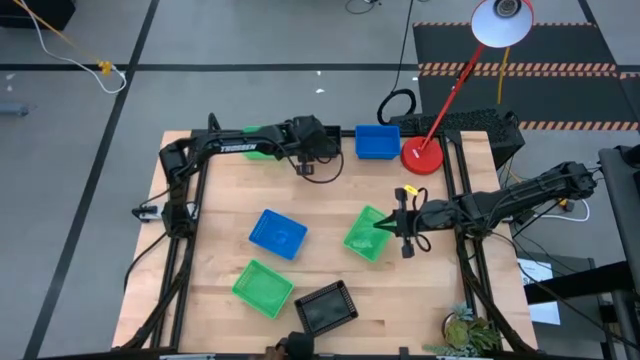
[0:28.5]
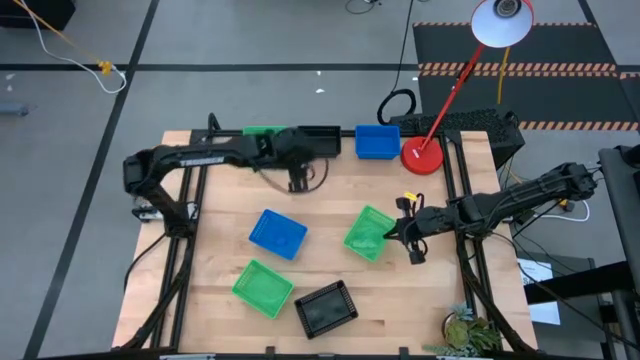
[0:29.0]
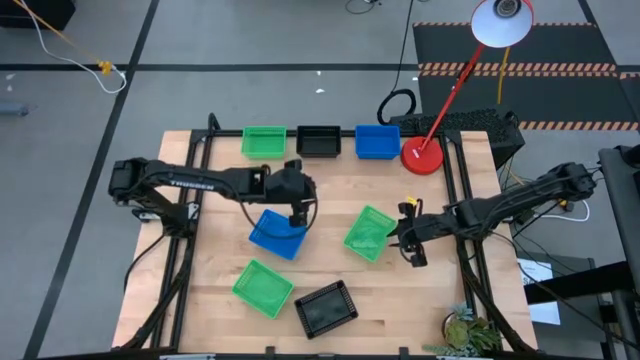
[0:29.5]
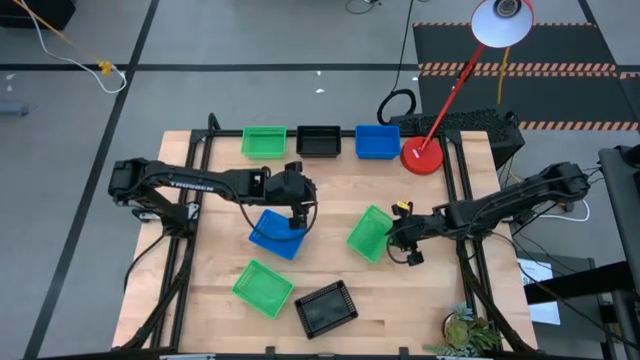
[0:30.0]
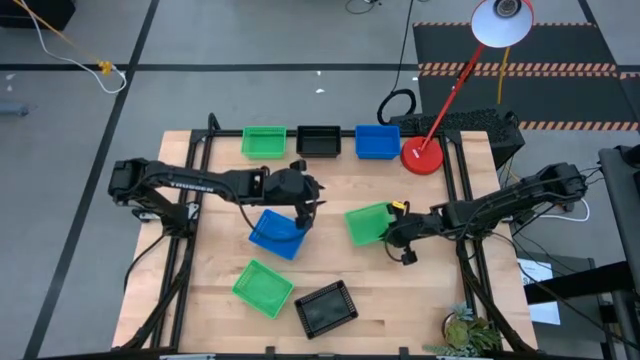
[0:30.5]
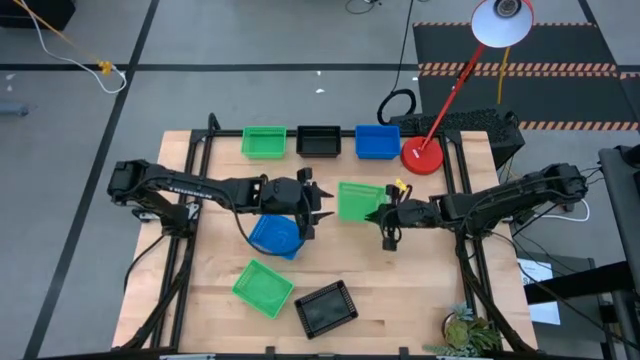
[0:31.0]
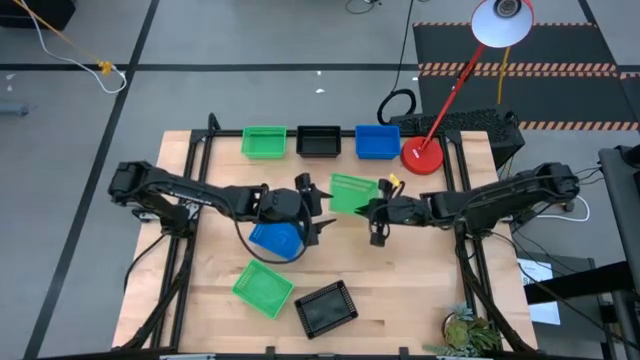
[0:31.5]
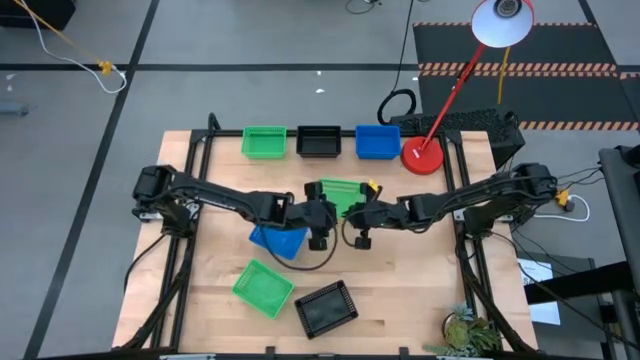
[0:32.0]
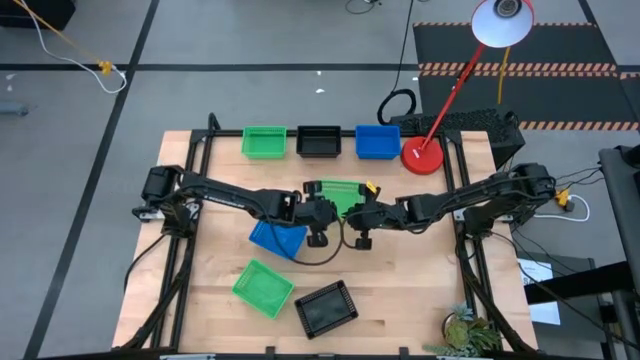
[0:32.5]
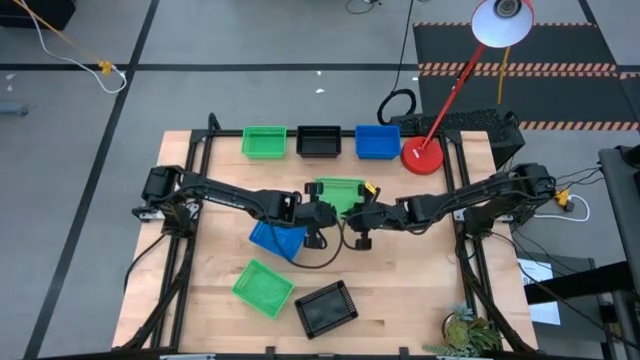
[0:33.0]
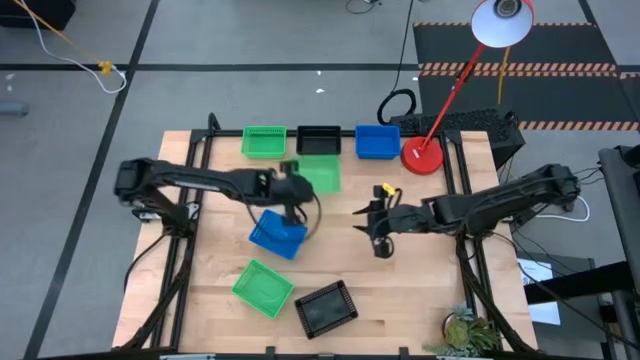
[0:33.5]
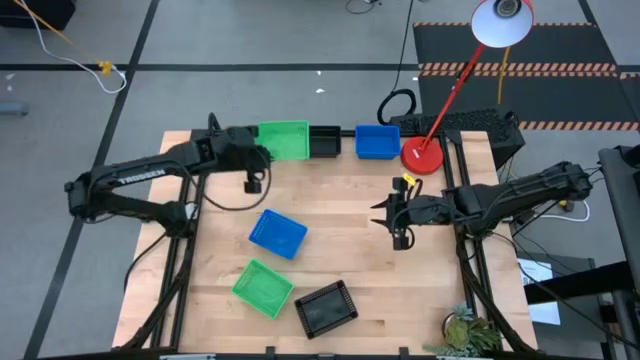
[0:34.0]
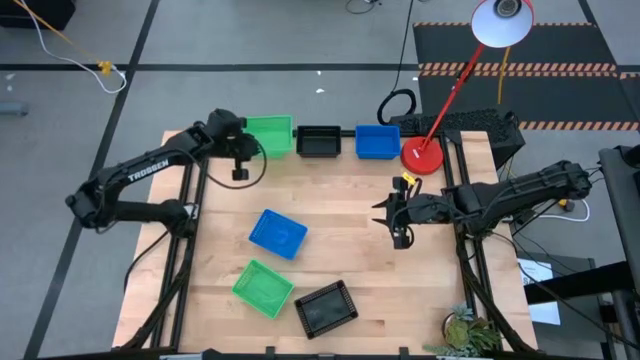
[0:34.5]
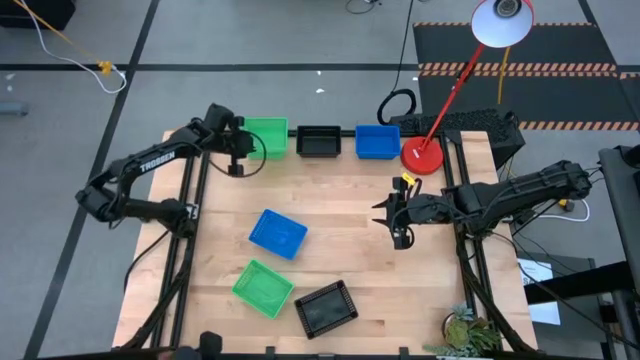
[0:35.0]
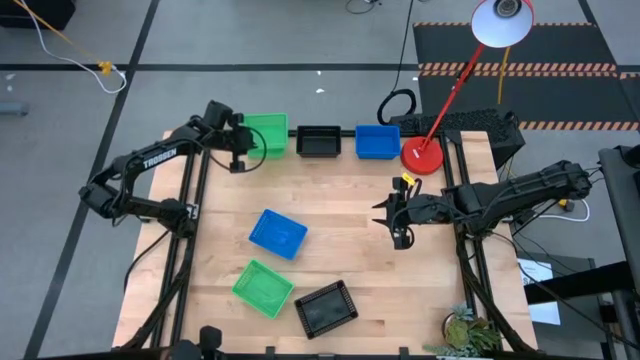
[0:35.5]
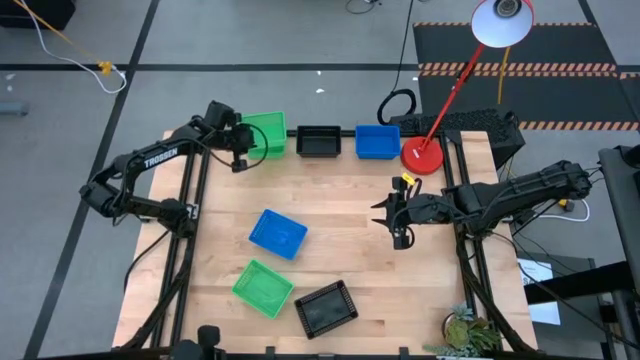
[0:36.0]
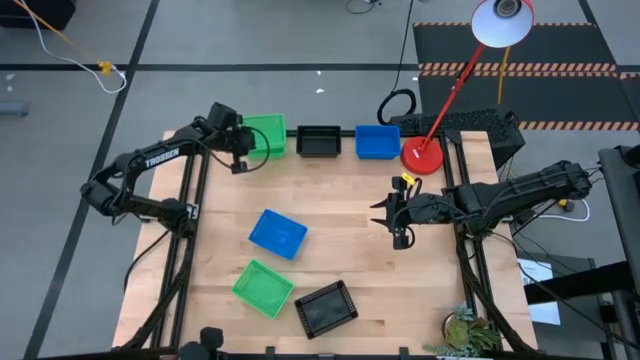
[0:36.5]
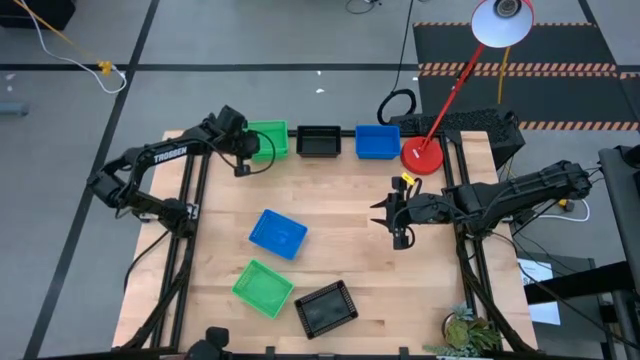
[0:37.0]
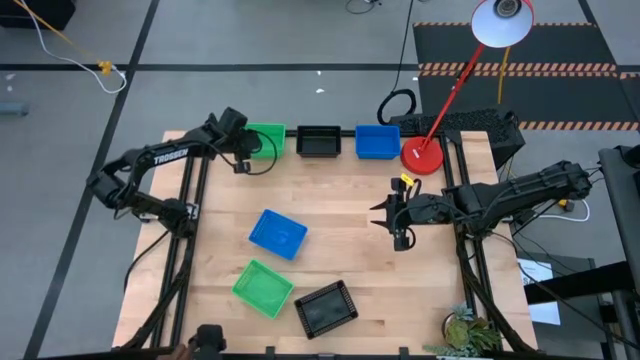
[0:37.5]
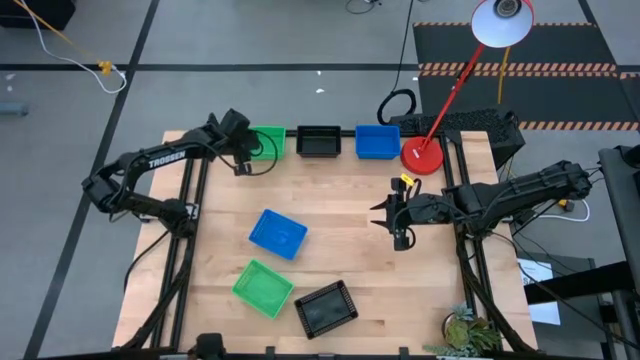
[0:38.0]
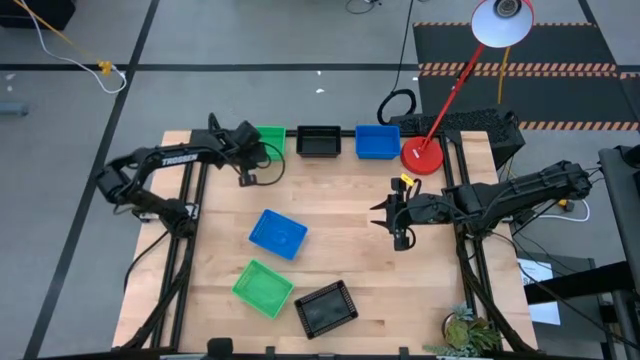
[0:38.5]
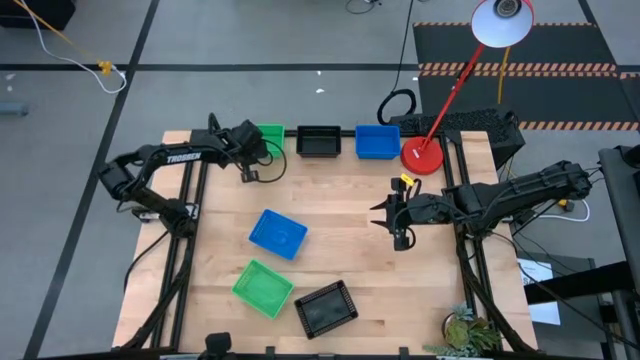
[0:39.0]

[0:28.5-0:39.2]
Stack the middle green bin on the top green bin

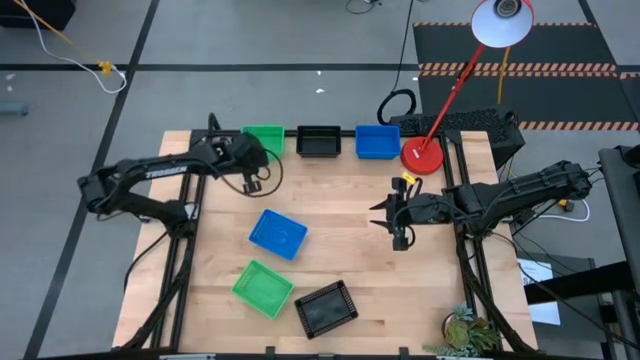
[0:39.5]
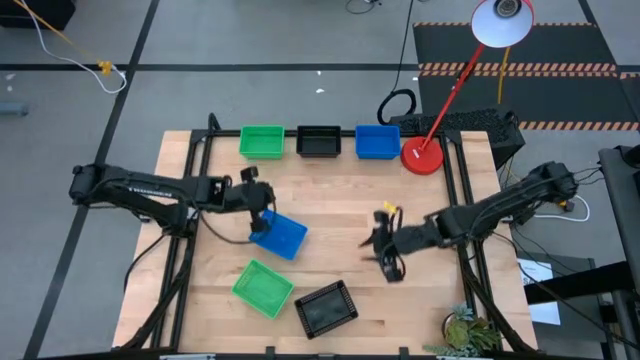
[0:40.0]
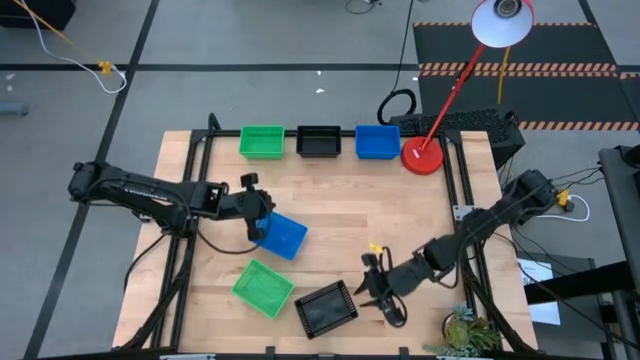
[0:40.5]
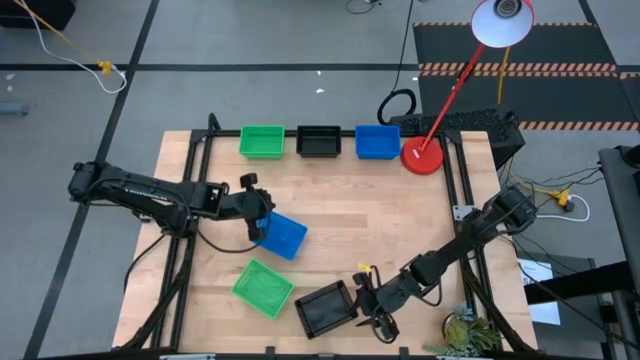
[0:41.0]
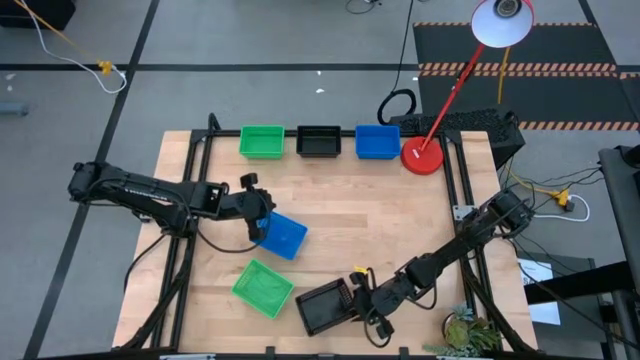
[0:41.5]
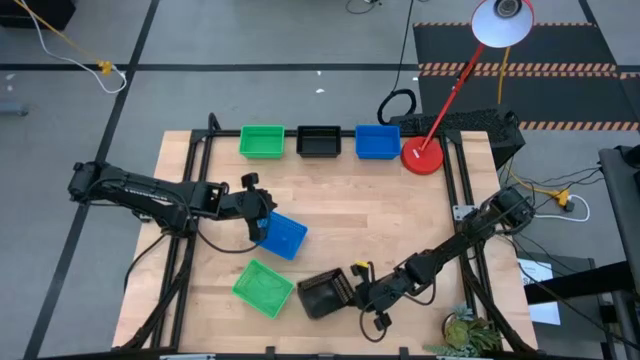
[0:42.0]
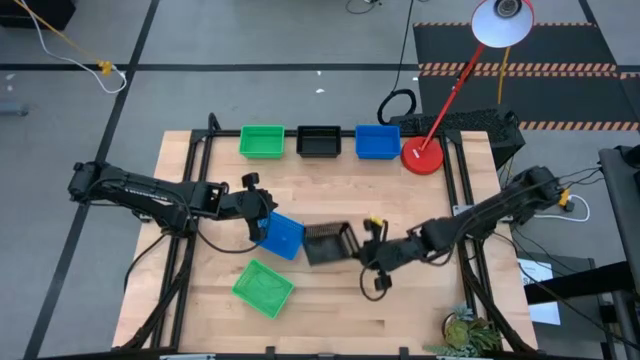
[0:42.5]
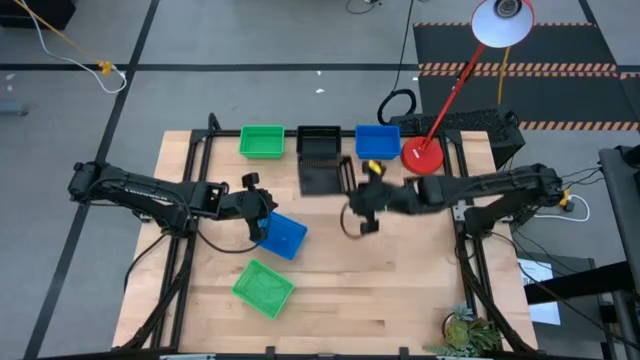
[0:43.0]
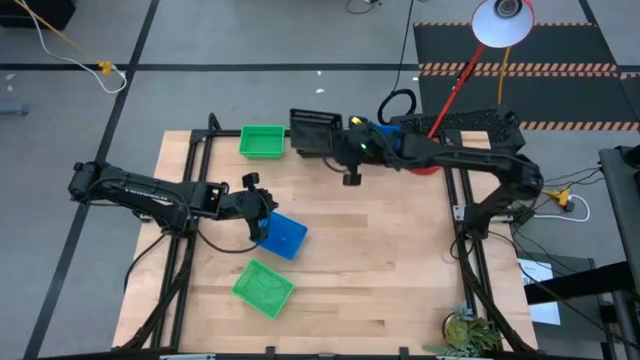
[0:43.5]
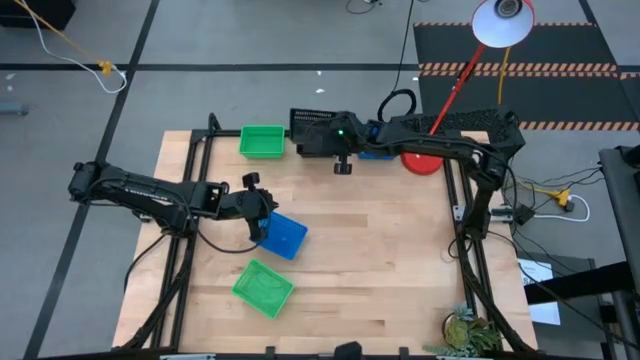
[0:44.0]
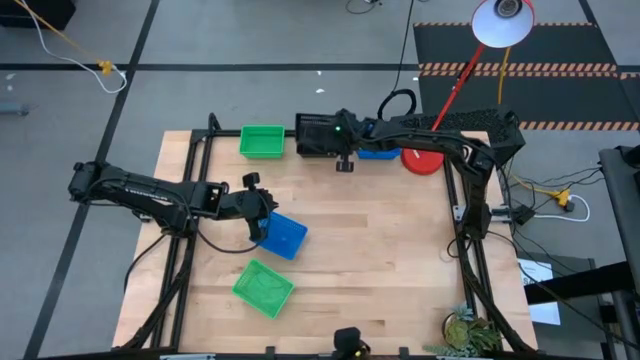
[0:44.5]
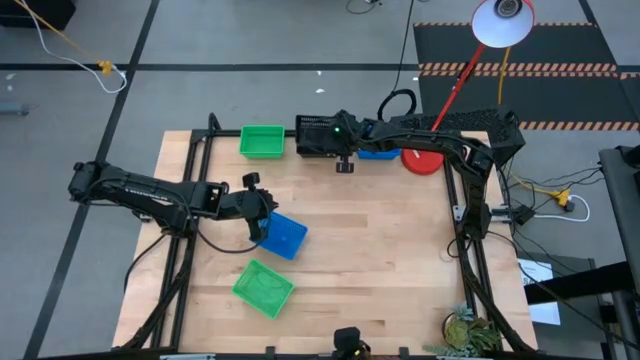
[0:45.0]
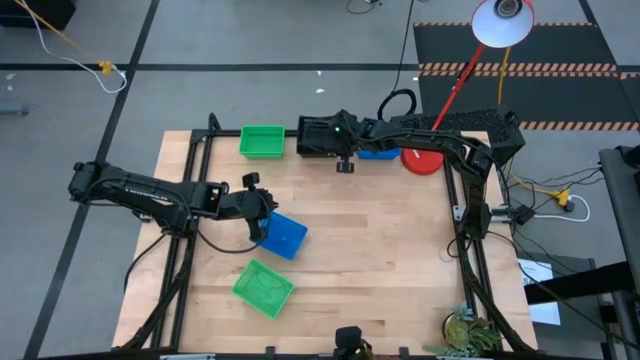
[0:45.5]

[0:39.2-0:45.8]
Stack the bottom black bin on the stacked black bins
